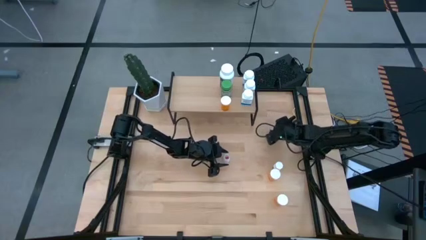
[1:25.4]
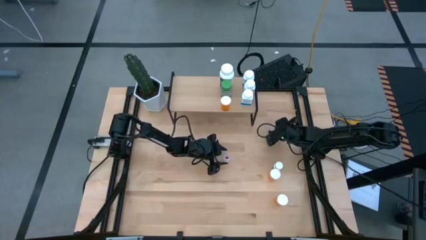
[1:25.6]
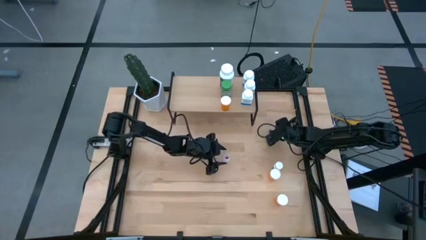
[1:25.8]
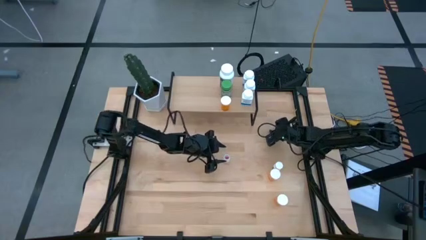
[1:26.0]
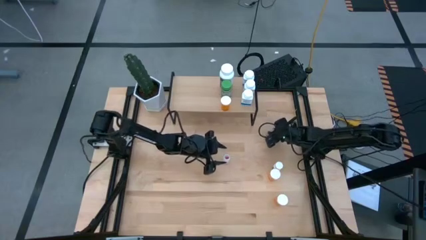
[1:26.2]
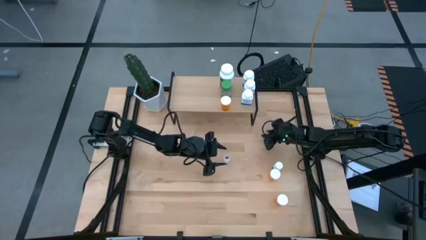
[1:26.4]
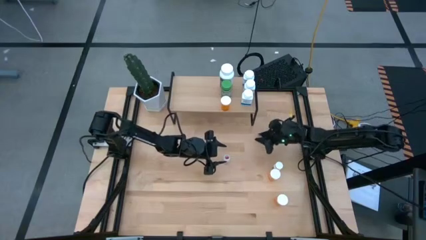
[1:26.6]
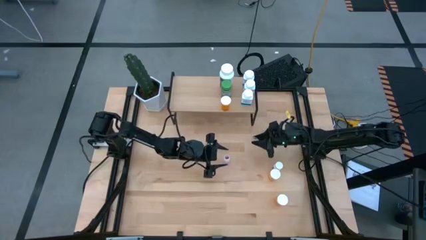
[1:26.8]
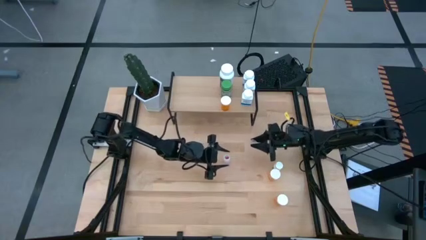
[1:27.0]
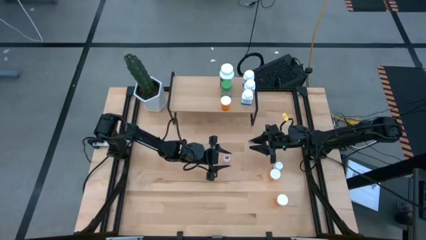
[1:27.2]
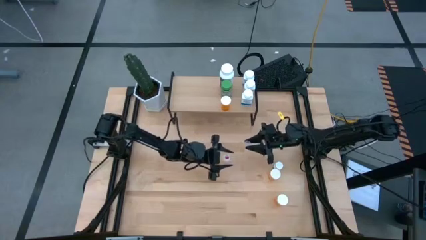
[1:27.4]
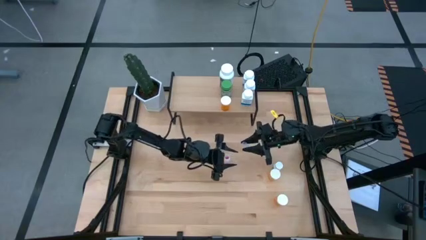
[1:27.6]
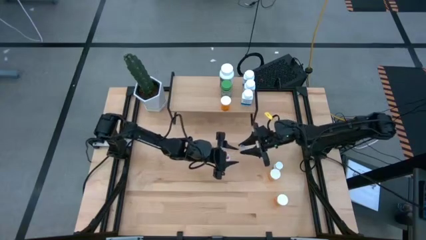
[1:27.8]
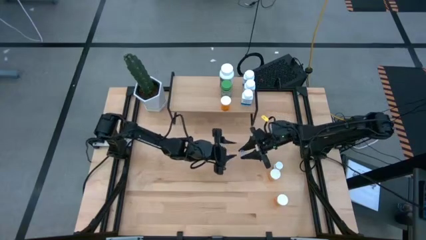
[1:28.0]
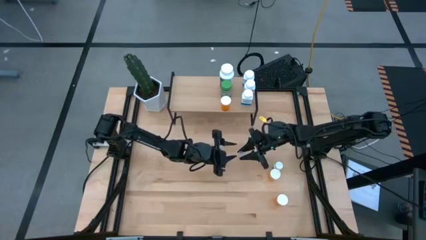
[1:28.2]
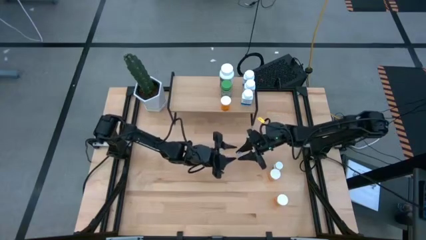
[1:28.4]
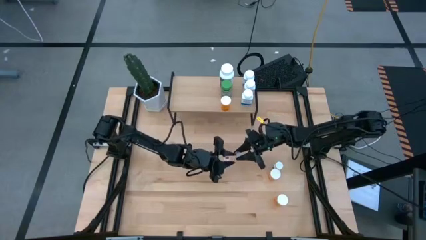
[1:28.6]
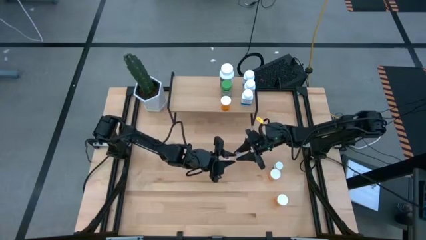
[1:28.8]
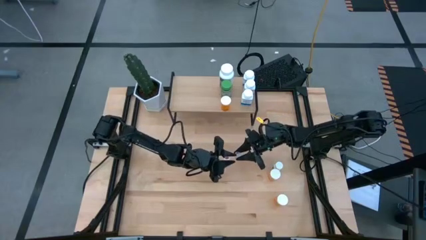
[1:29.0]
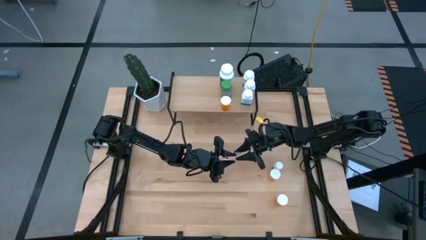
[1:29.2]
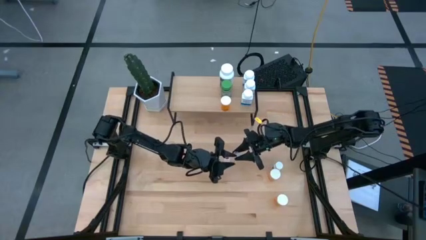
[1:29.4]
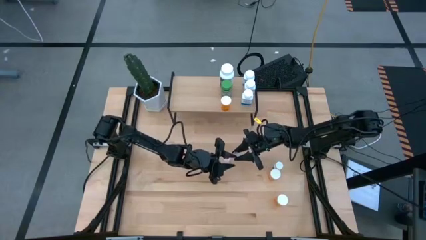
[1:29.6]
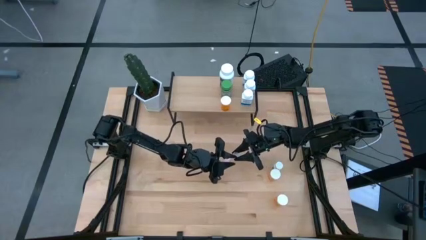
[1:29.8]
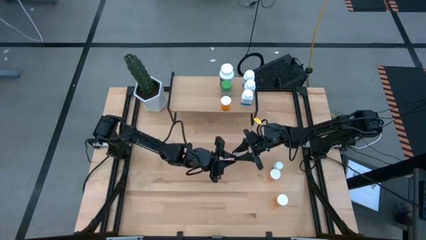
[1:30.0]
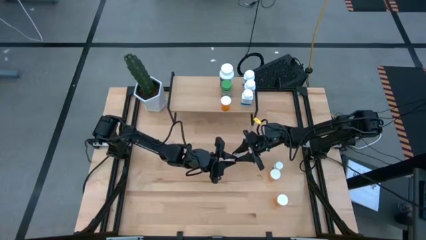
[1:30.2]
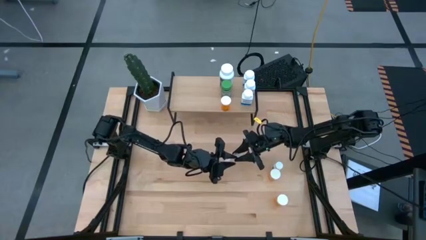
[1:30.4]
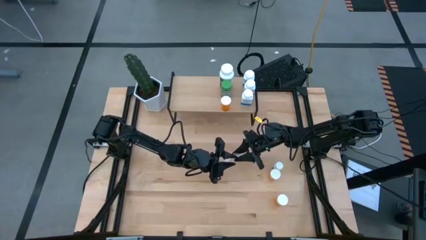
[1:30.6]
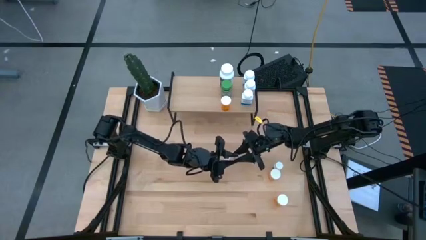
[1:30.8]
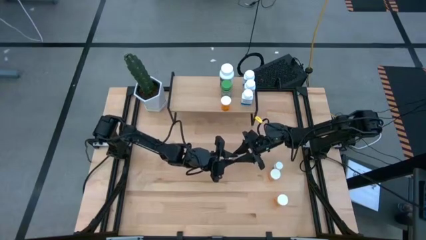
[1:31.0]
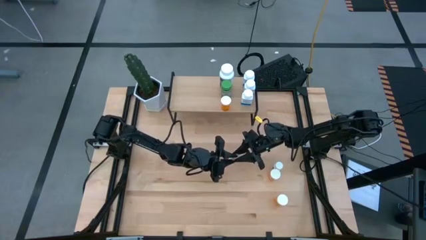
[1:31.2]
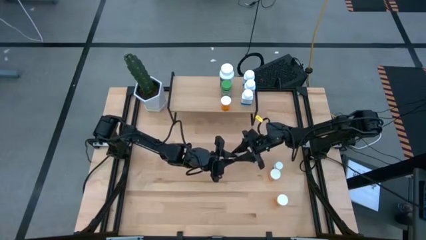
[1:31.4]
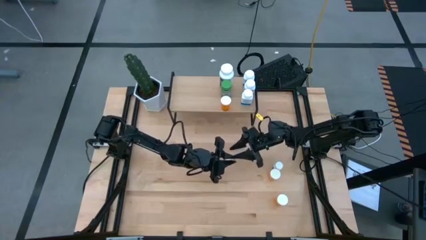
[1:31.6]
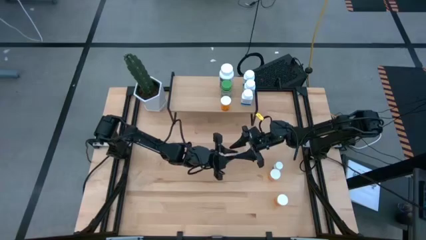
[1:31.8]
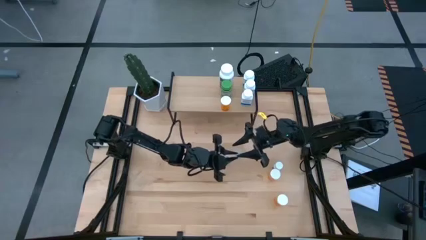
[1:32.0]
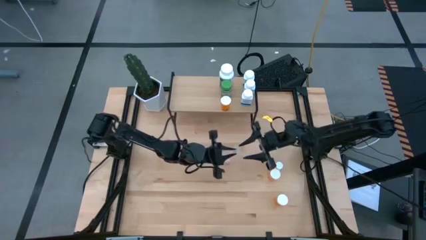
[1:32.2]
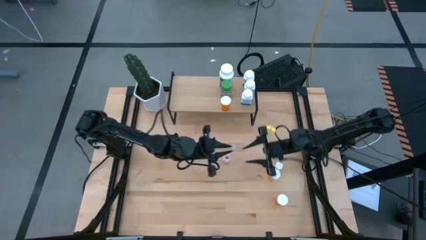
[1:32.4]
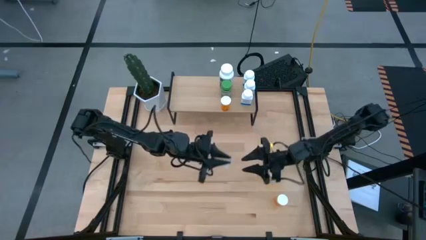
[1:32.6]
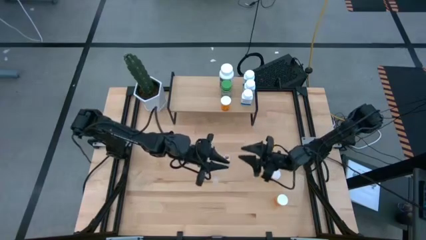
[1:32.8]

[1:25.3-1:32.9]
Task: Pick and place medicine bottles onto shelf by color
Close the lid on the transparent capsule bottle

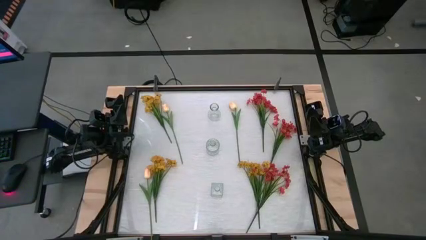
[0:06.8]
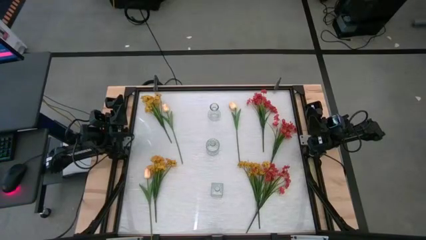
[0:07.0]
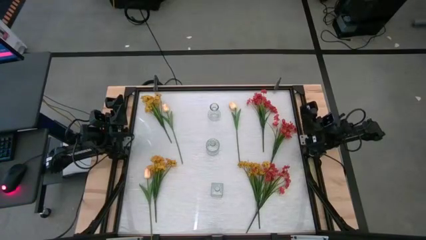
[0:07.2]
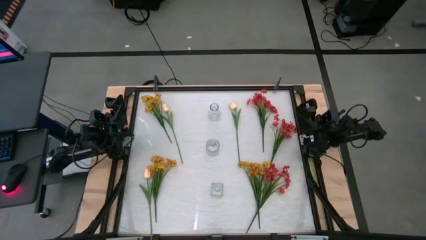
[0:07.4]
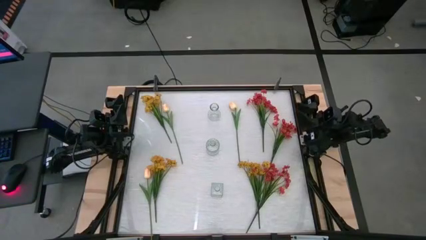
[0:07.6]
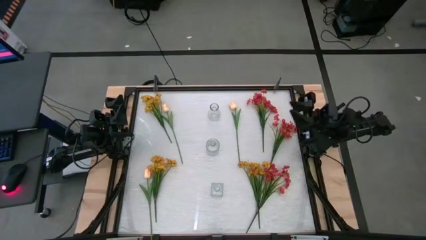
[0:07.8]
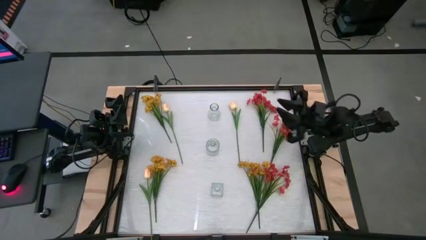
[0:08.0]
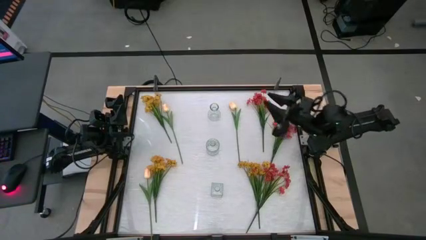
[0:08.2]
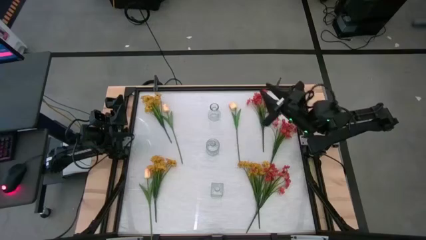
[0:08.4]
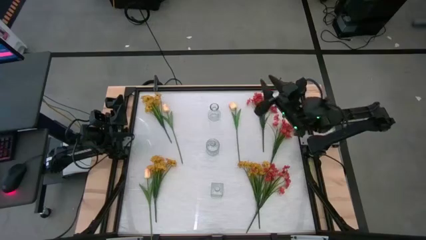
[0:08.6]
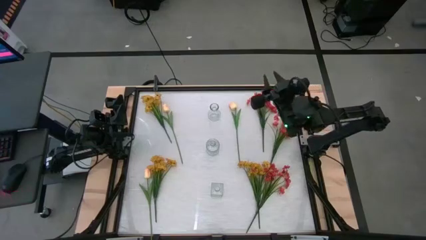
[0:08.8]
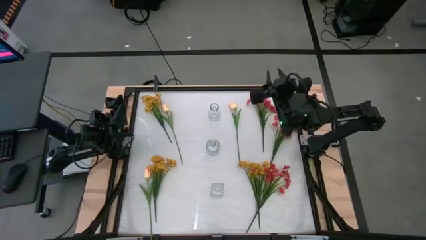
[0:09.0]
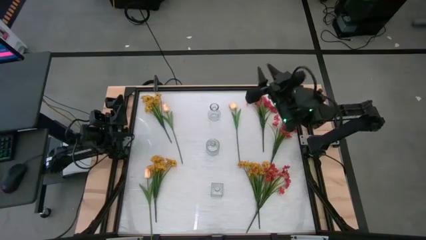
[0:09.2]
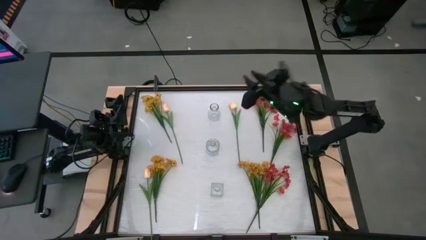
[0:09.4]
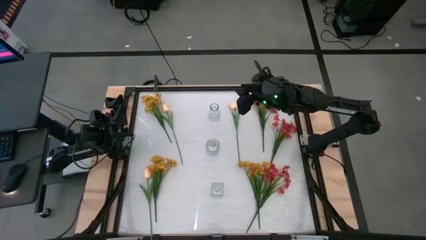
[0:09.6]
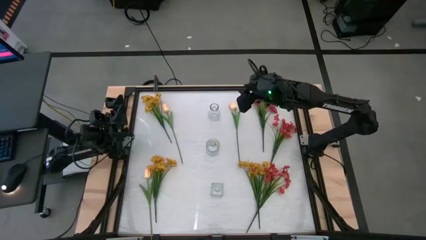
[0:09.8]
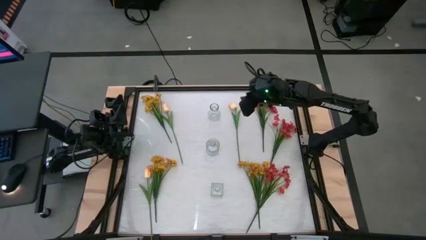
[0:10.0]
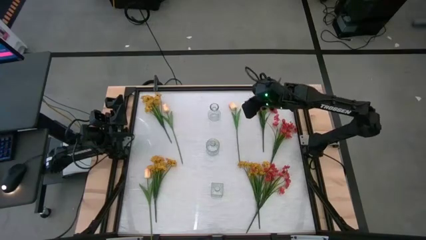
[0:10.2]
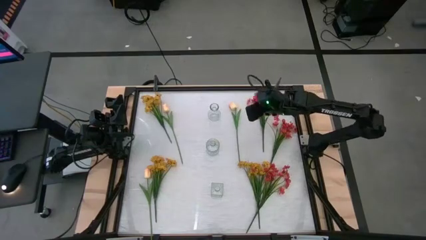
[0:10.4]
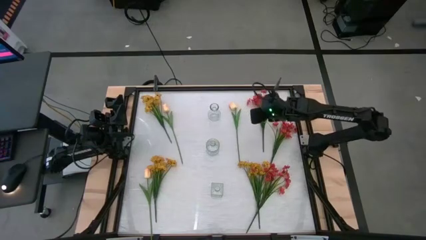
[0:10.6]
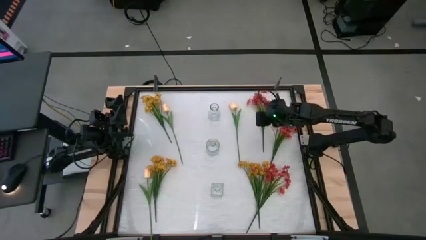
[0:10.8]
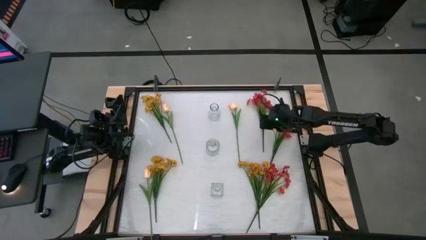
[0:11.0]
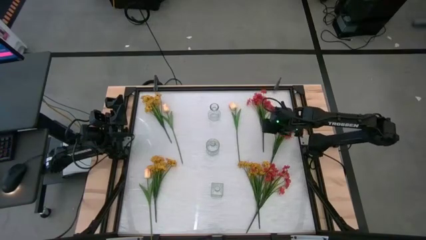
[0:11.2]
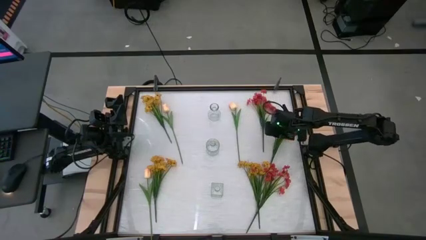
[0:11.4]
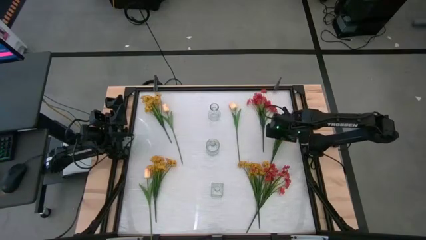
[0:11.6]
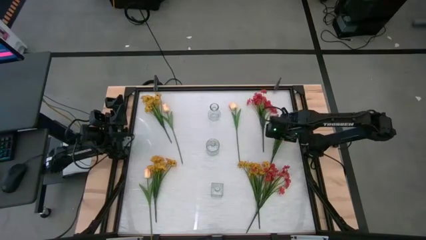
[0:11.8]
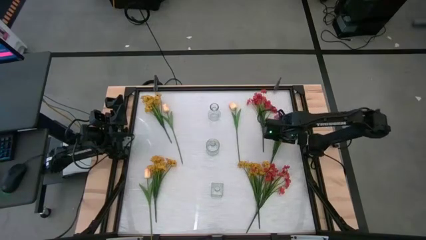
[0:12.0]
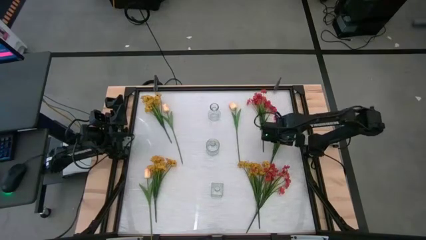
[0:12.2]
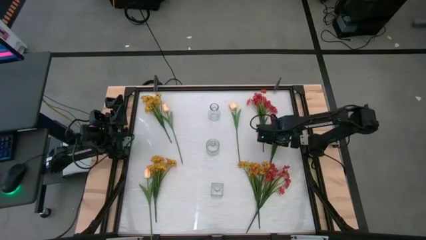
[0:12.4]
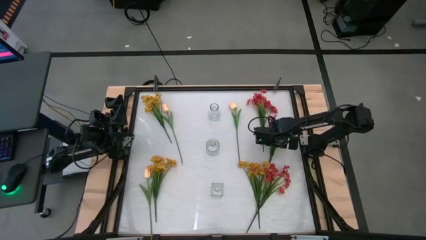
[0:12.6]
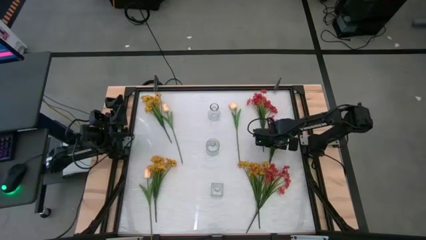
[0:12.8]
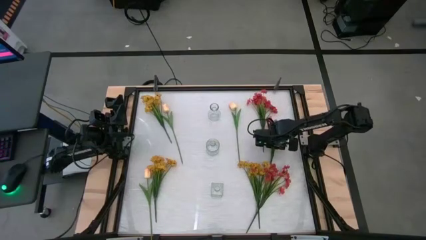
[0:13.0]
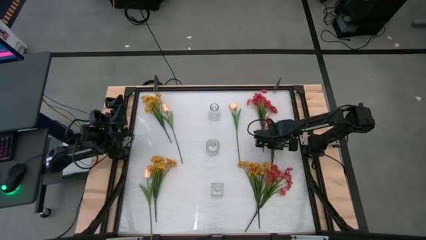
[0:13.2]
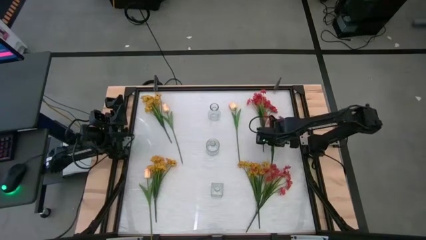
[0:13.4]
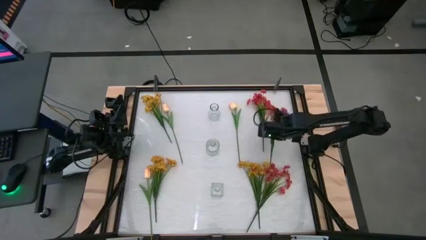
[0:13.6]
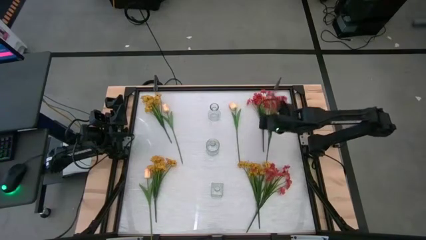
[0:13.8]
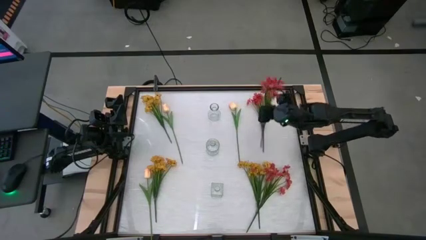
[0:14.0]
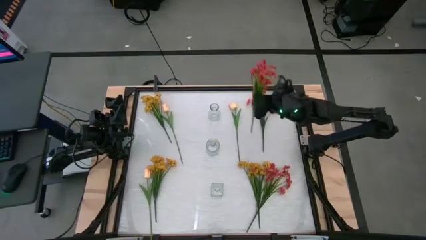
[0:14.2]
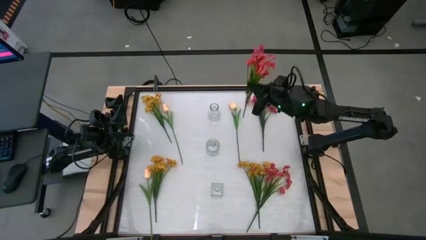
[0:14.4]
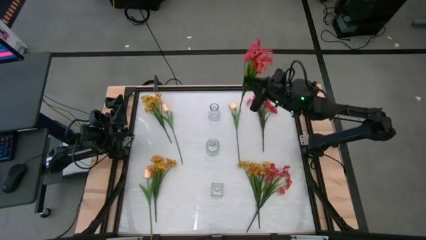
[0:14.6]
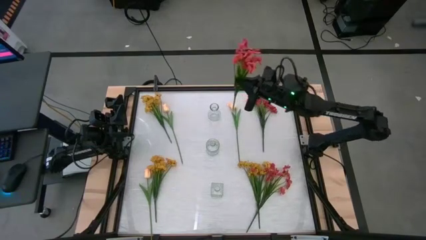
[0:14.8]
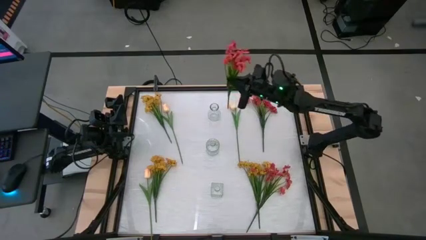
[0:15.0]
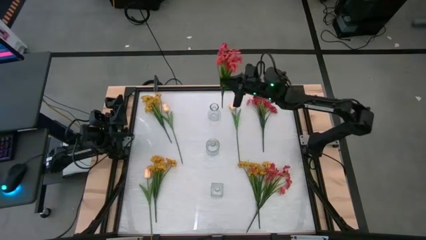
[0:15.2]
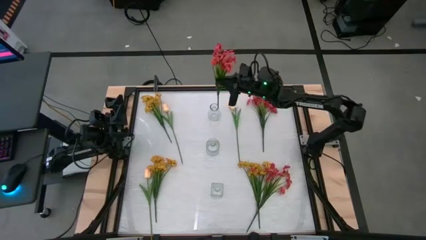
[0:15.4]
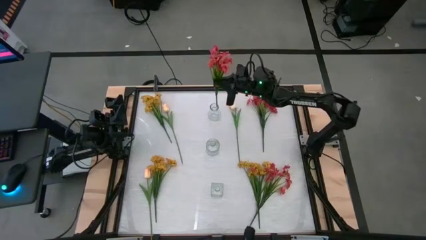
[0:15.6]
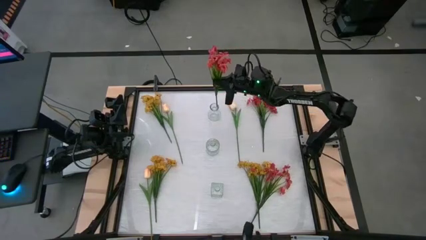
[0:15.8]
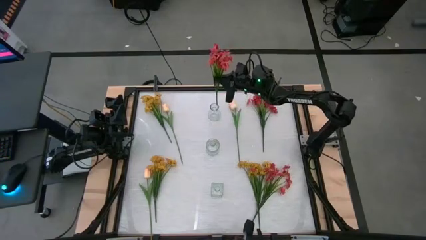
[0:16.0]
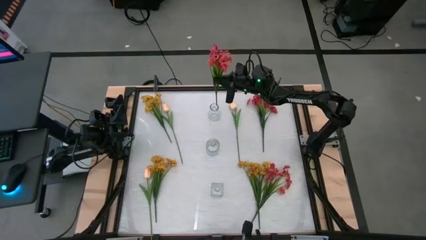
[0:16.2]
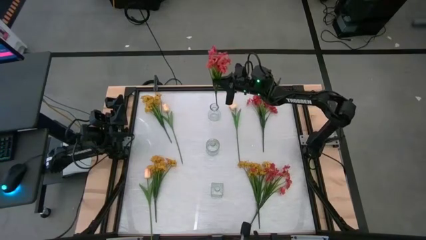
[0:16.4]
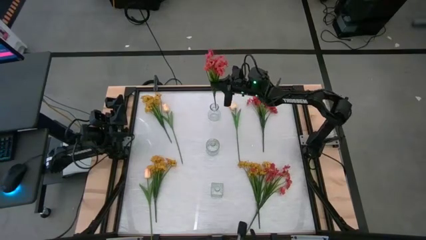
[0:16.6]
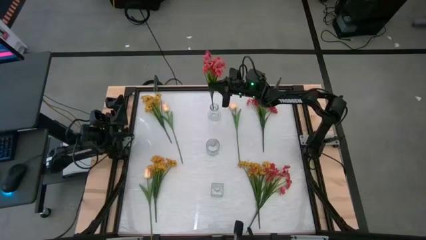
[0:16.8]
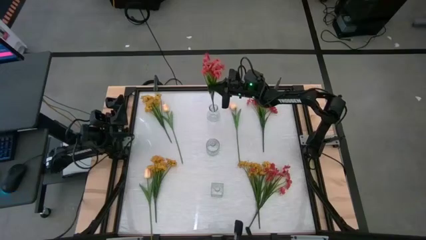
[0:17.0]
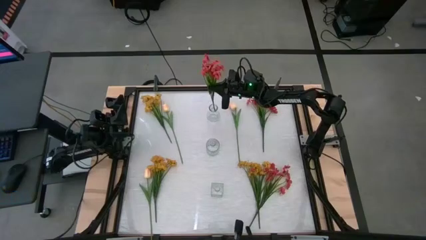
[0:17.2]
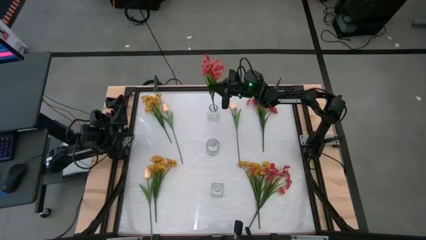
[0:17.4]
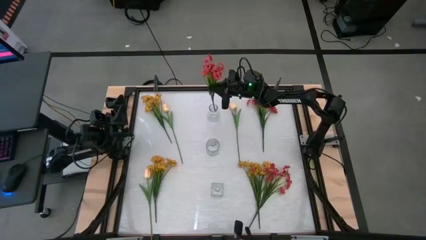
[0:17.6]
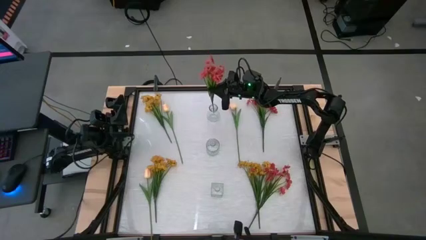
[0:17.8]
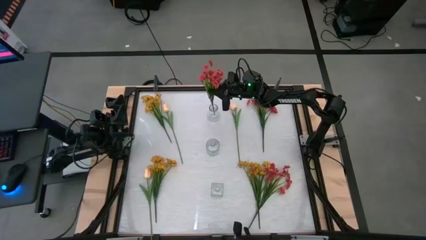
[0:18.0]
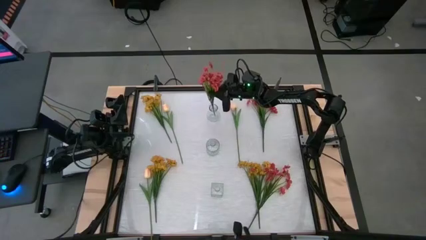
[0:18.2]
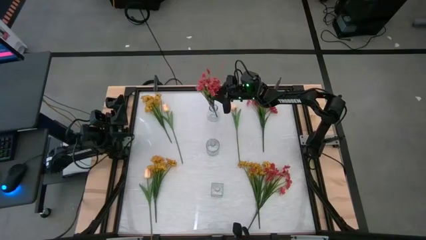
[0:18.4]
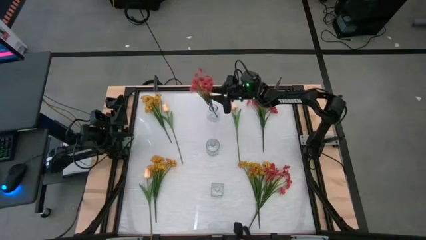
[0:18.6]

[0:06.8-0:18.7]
Task: Sort flowers into vase by color
Put the middle red flowers into the top transparent vase
